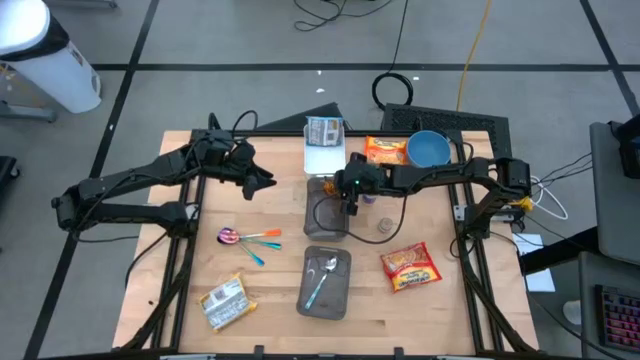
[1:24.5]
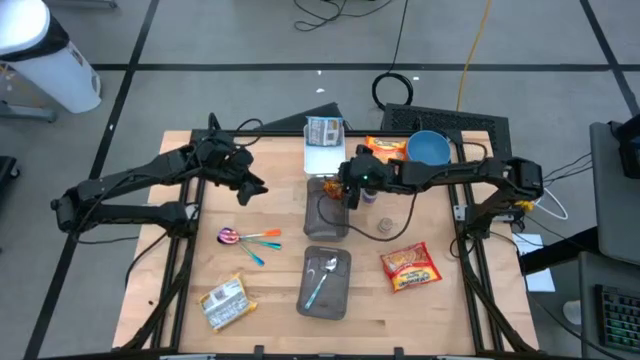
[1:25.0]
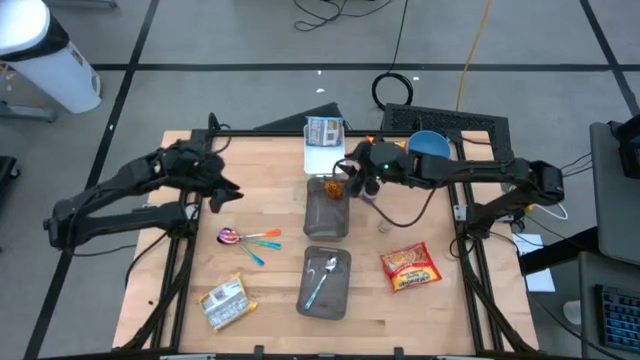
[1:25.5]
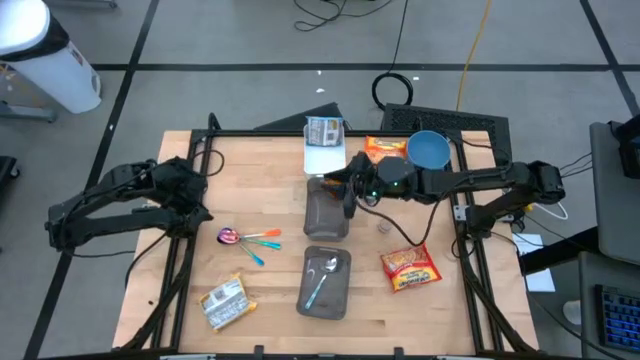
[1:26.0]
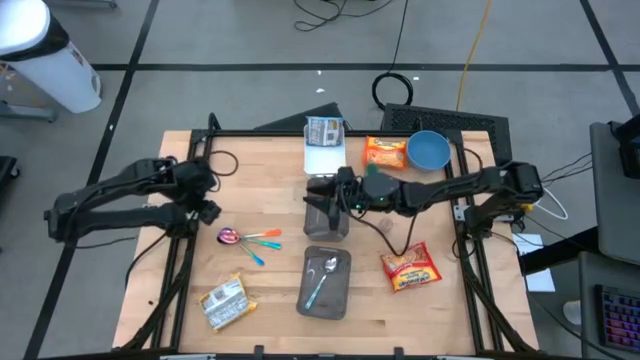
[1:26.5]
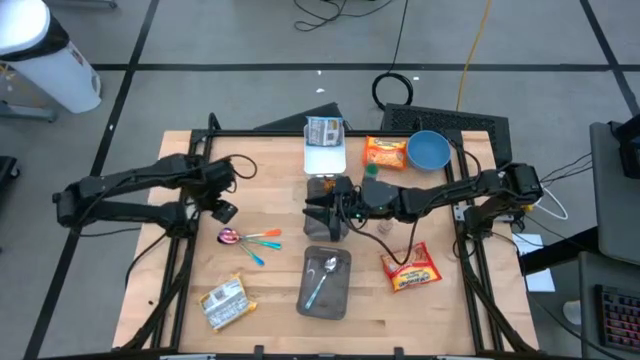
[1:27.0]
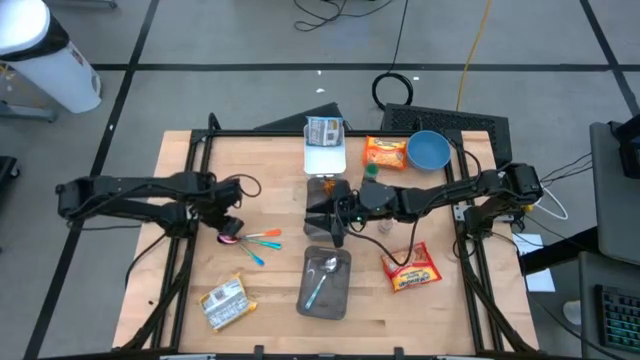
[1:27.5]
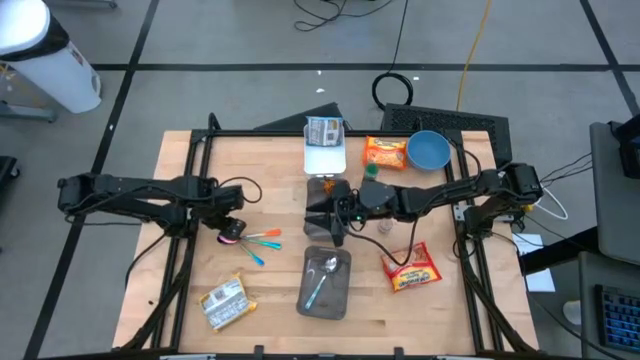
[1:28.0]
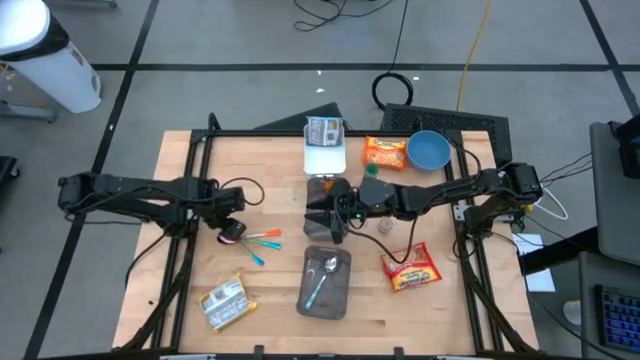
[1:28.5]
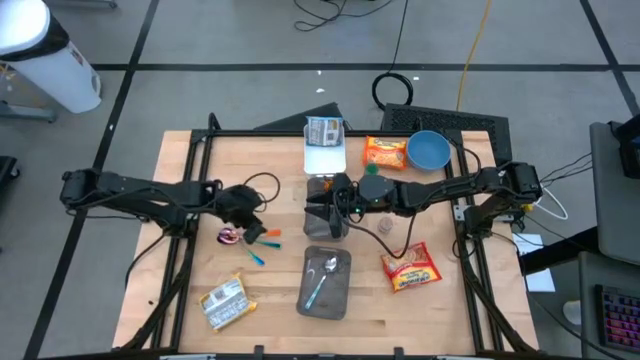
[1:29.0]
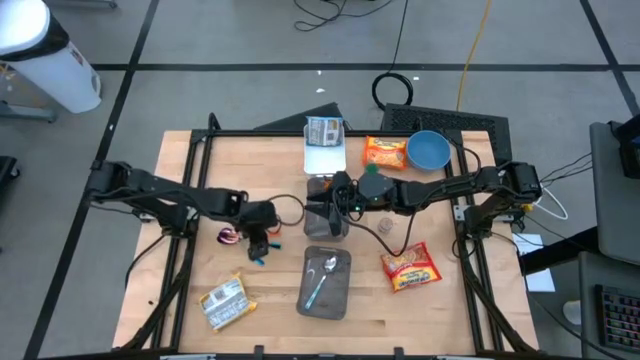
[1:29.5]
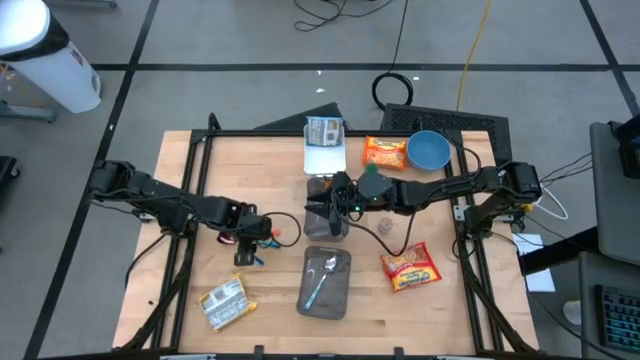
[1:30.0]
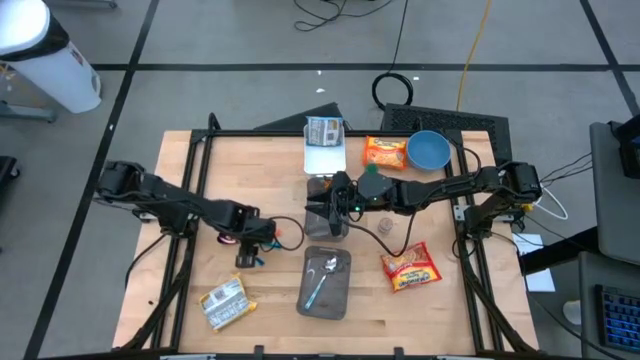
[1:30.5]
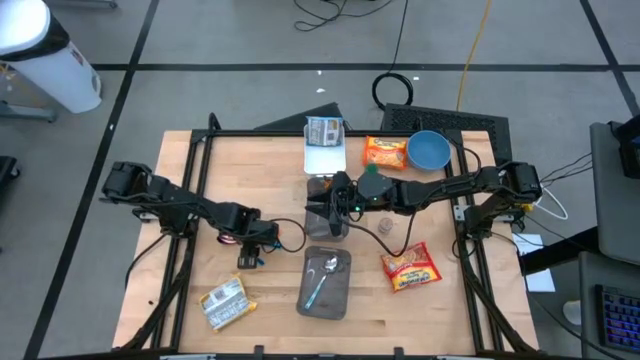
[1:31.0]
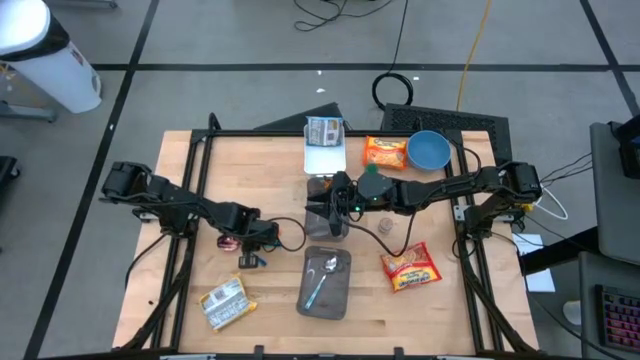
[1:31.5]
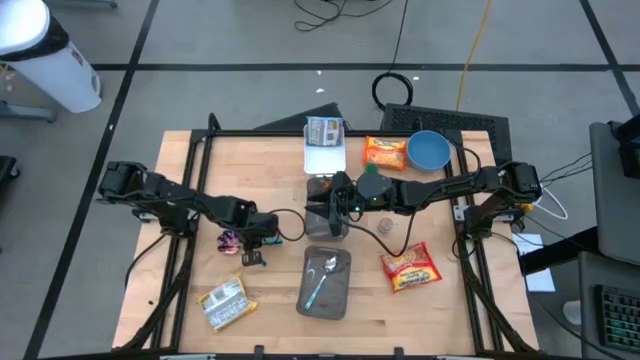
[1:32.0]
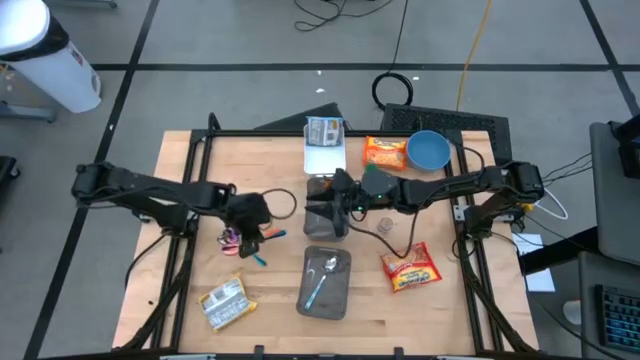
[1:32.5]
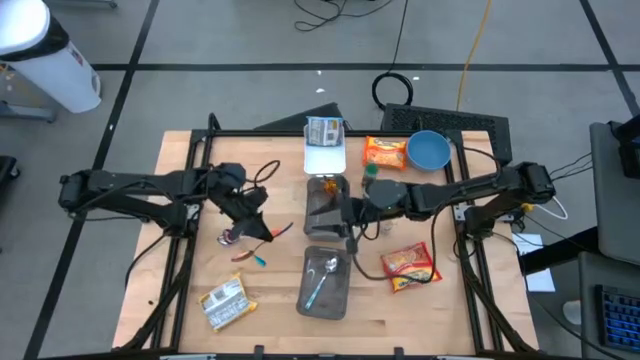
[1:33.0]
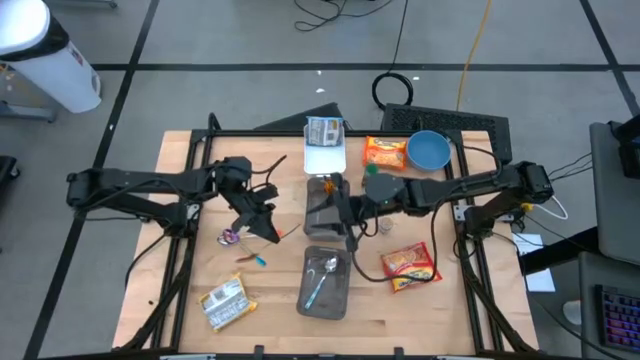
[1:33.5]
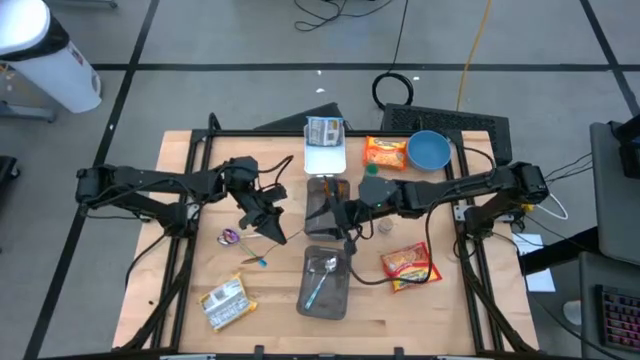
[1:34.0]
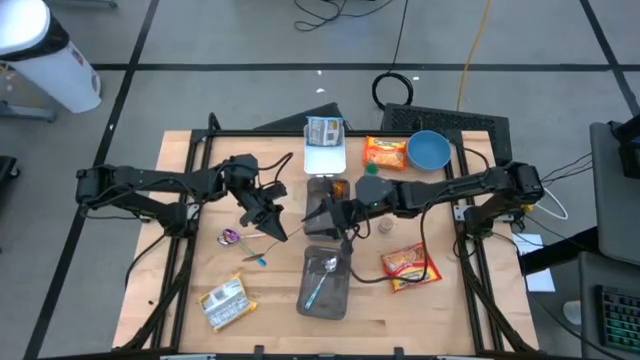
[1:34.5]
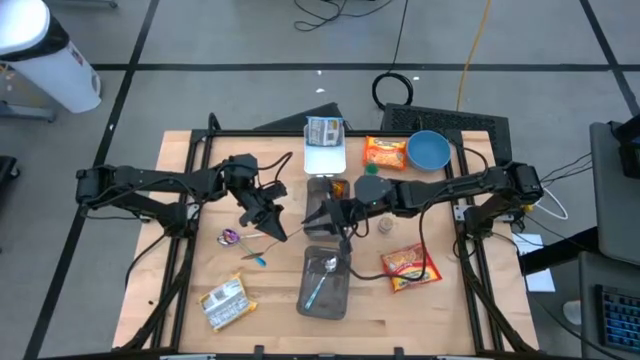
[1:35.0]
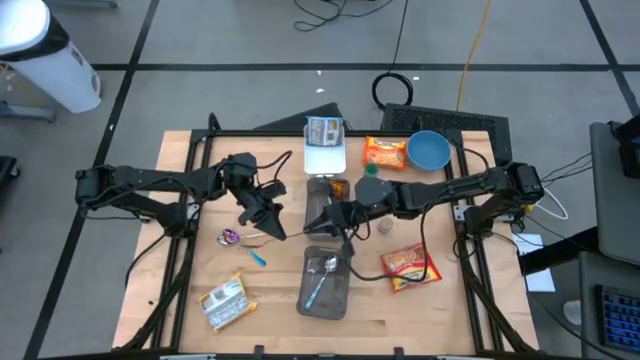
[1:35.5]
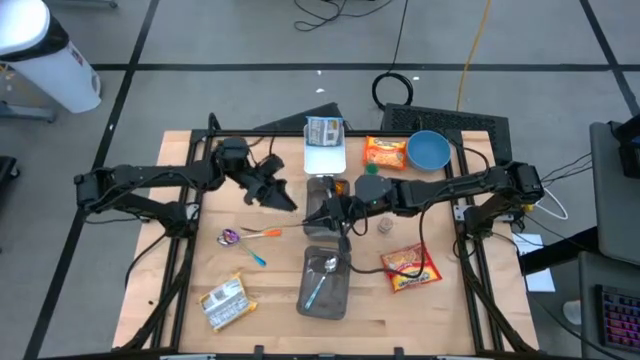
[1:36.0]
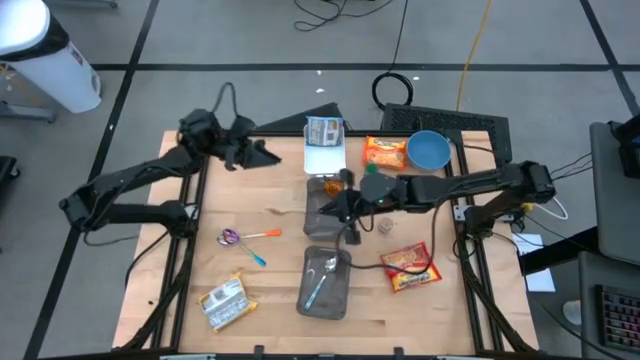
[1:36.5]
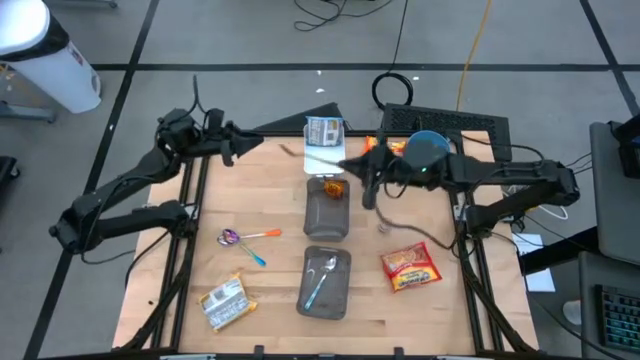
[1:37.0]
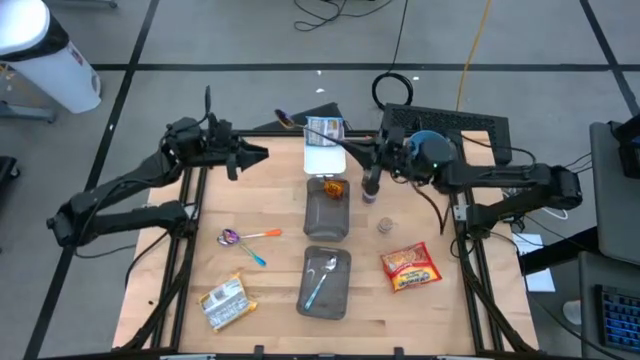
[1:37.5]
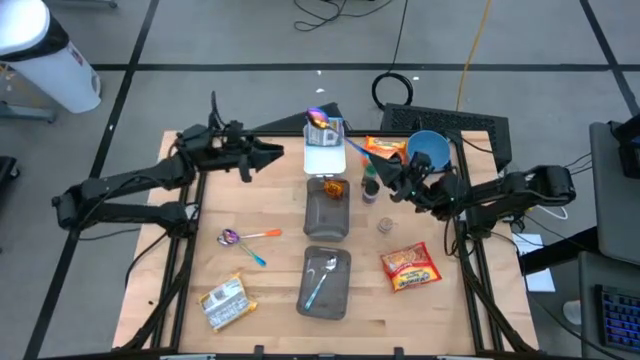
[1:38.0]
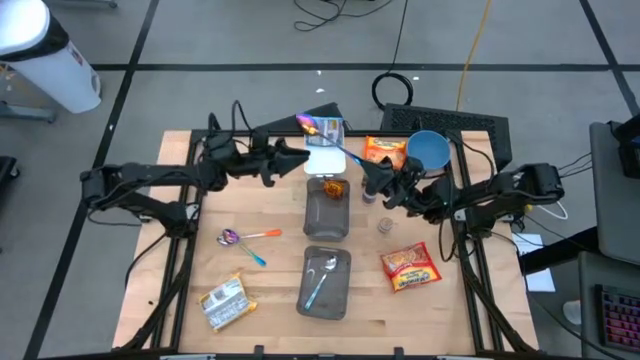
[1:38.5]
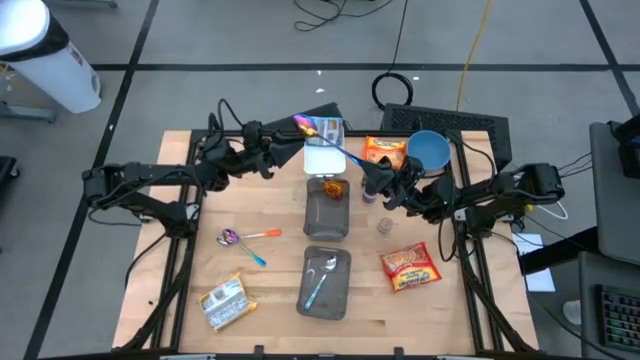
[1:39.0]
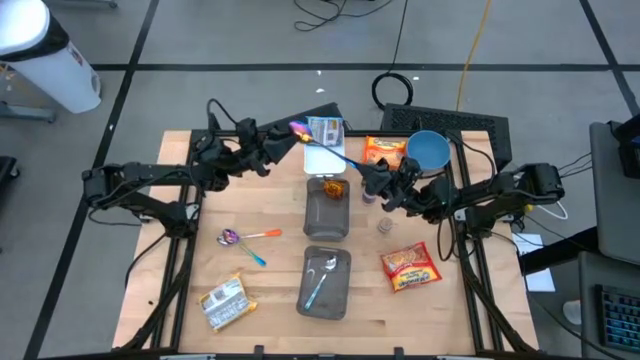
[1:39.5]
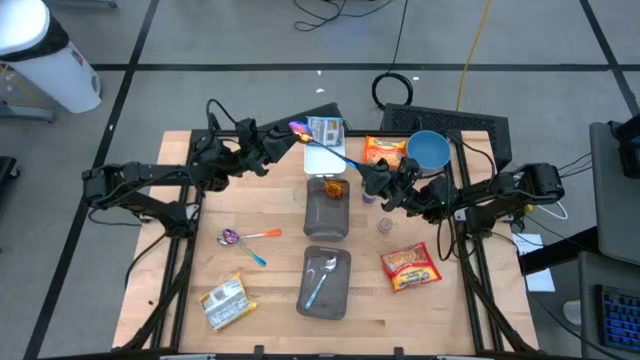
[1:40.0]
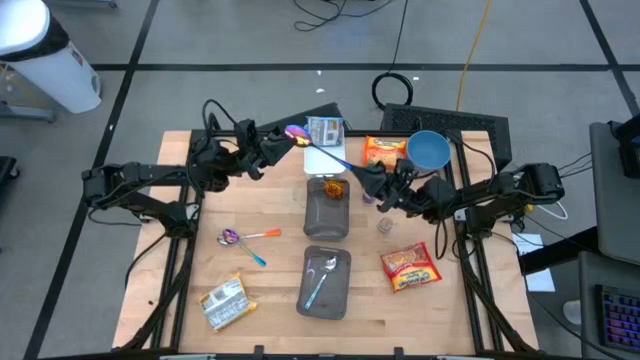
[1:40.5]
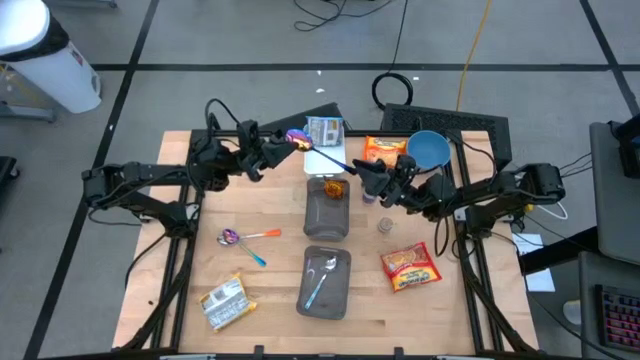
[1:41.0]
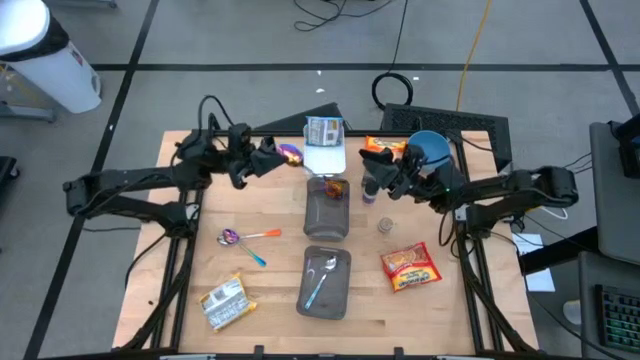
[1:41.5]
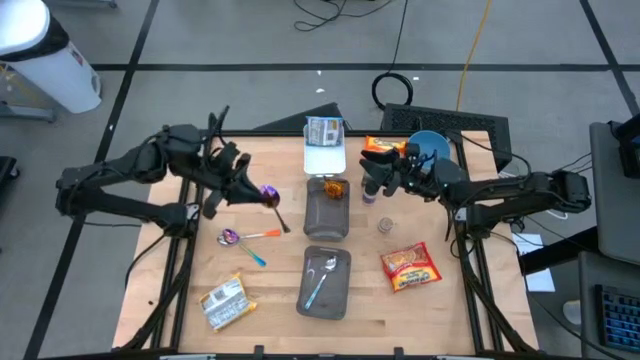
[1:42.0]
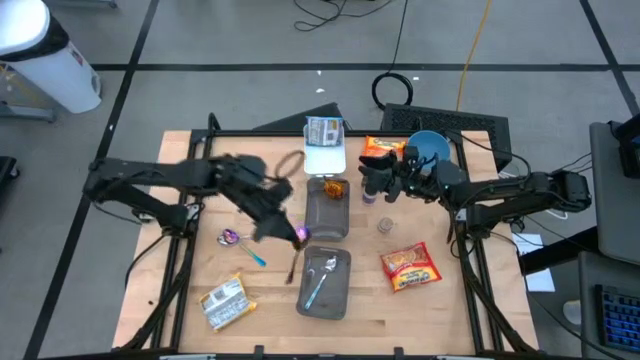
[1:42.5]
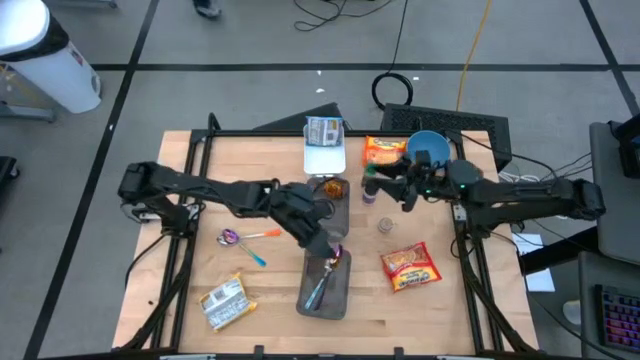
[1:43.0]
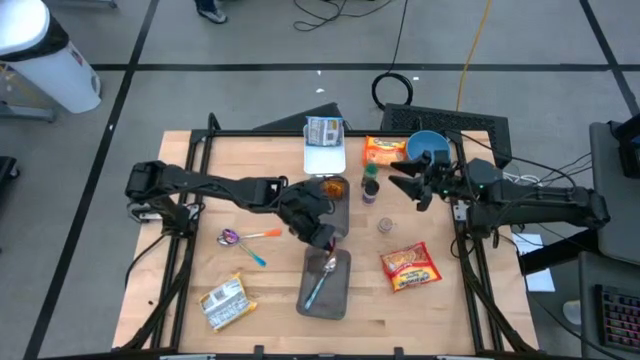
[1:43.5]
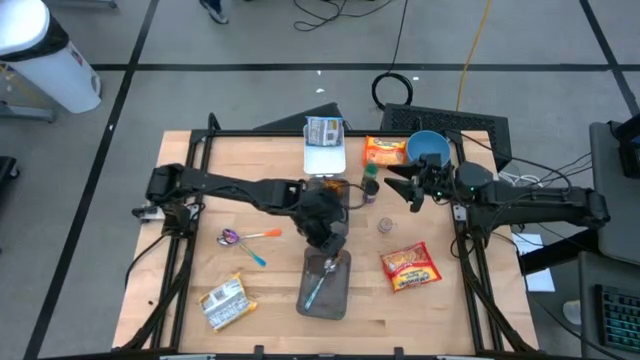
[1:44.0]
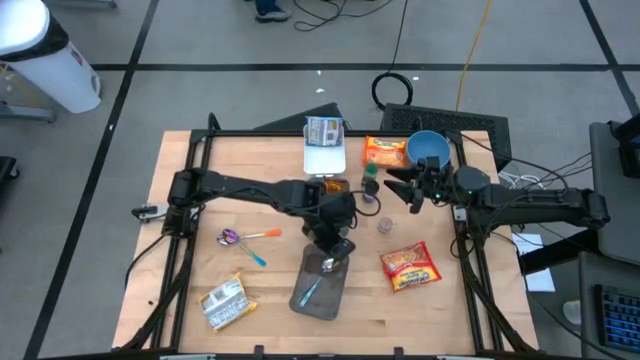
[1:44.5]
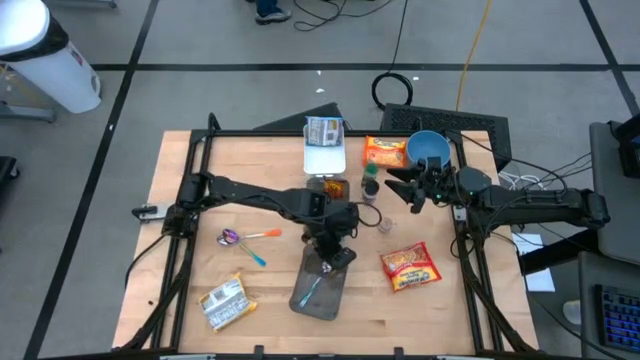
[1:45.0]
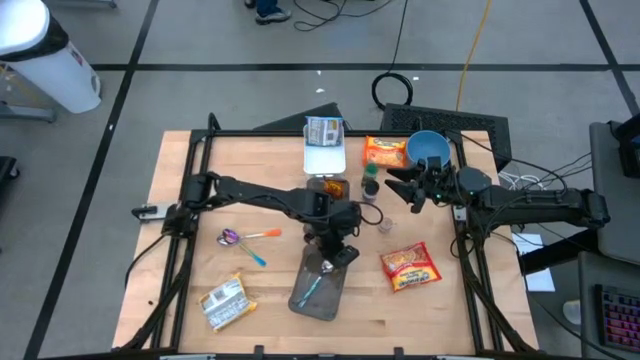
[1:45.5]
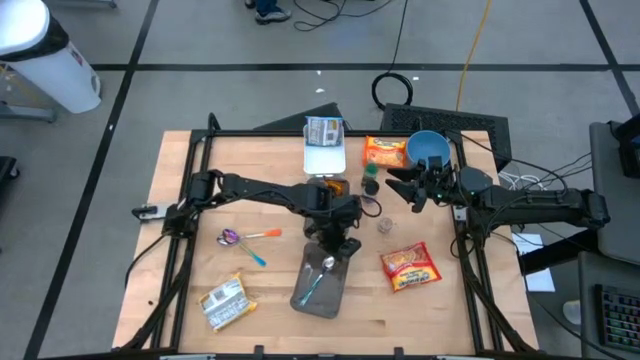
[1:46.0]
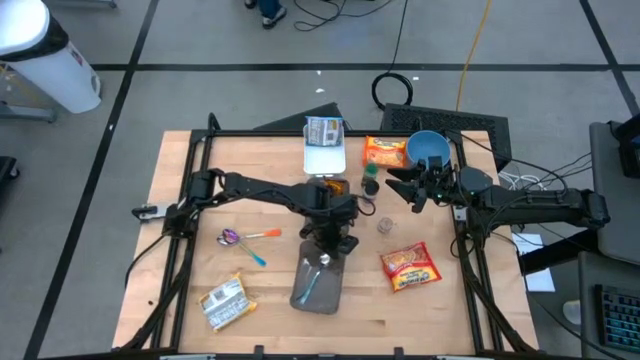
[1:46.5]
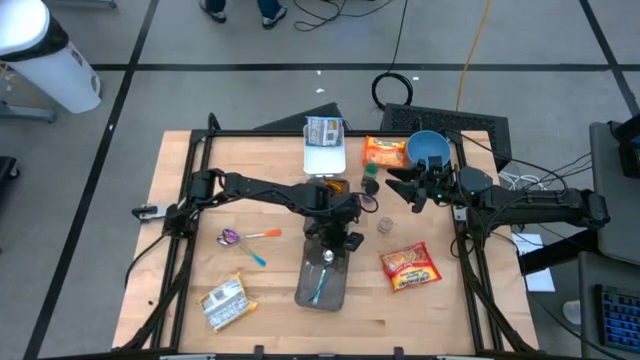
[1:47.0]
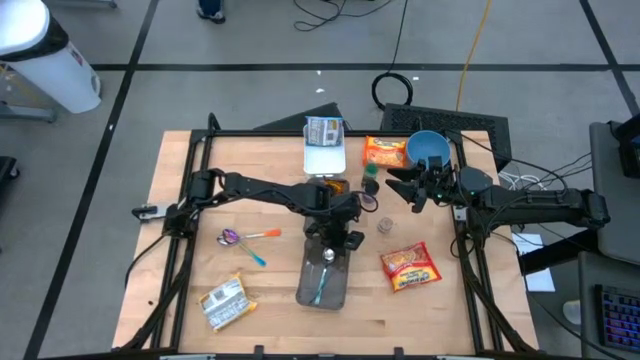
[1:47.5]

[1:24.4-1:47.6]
Task: Pick & Place Food Item
Put the blue spoon into the bottom black bin
